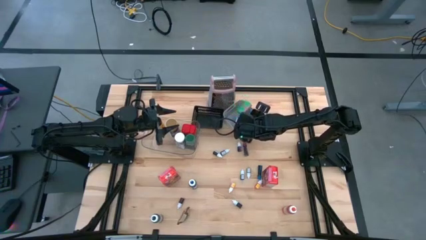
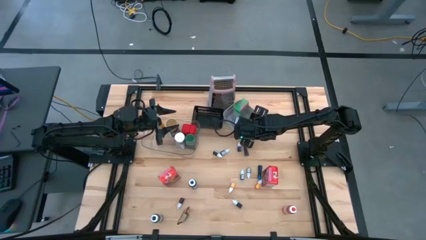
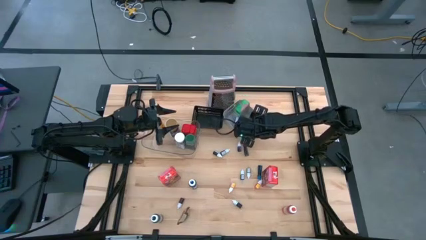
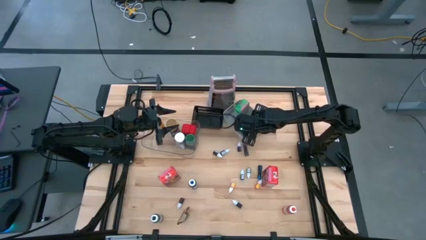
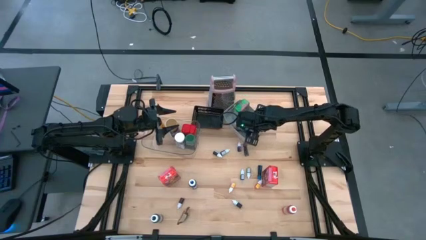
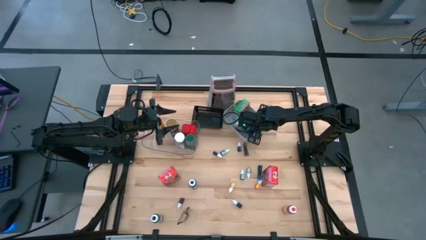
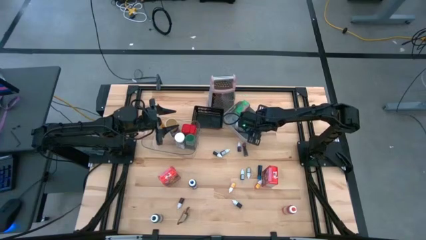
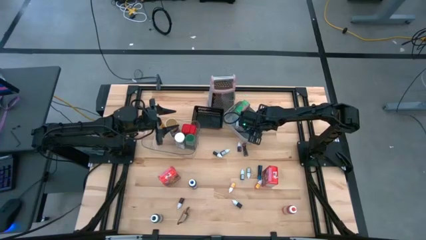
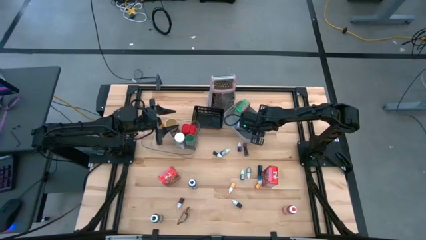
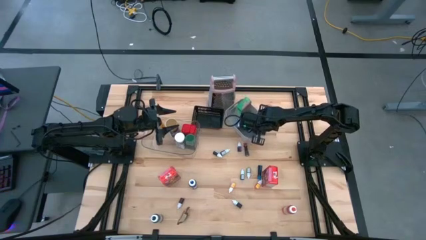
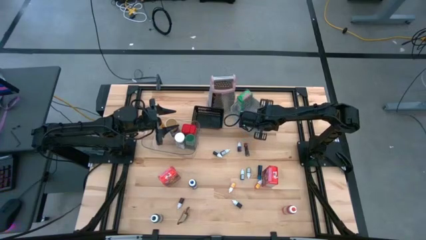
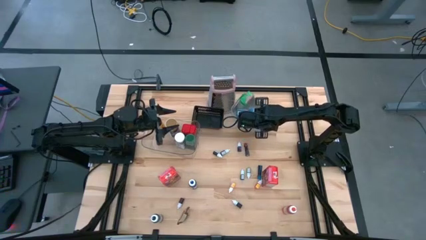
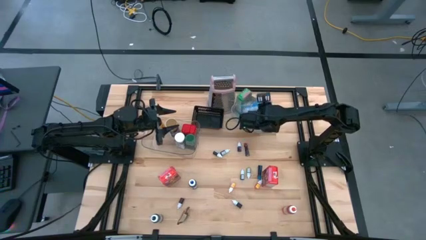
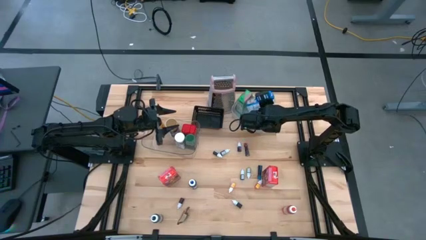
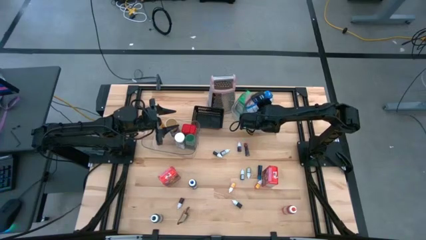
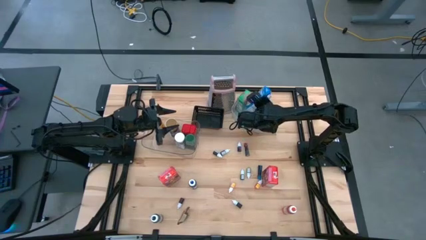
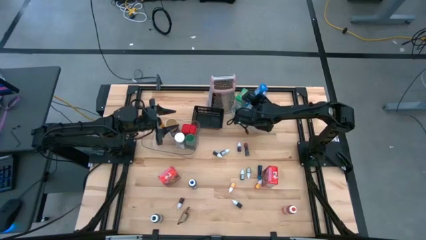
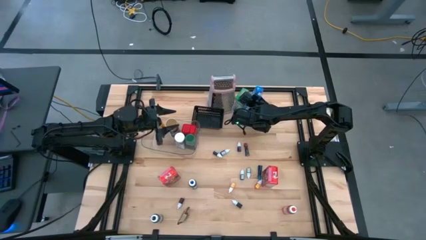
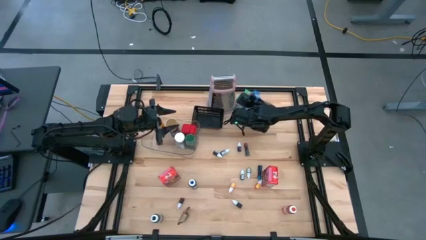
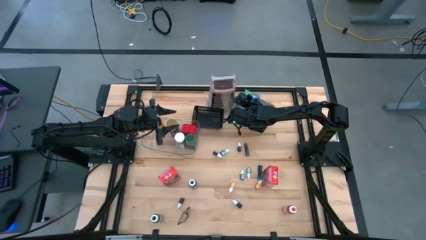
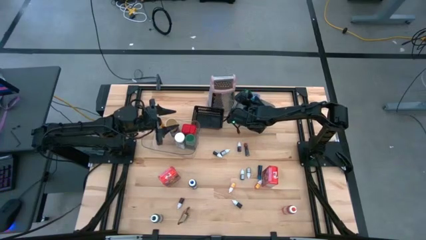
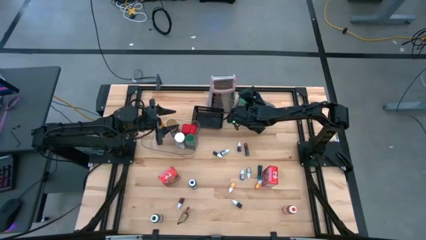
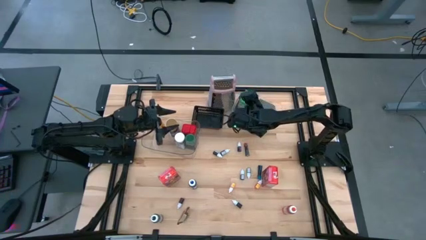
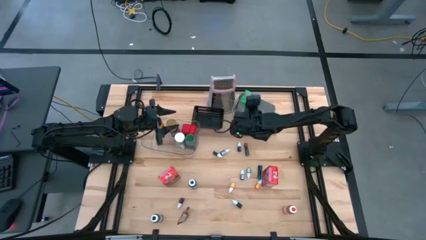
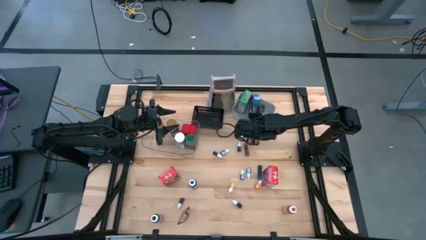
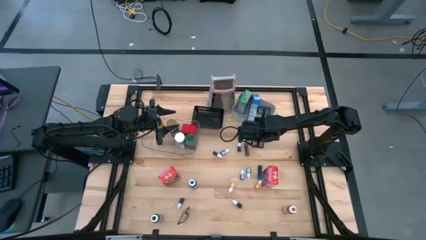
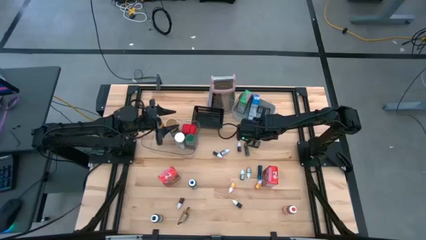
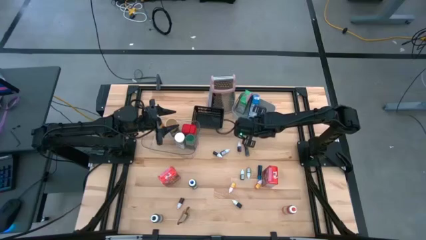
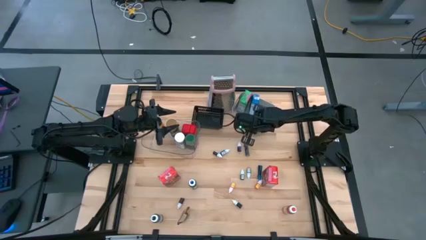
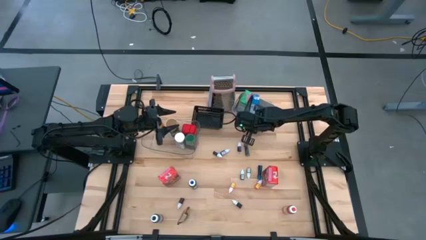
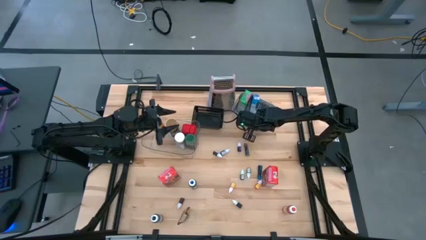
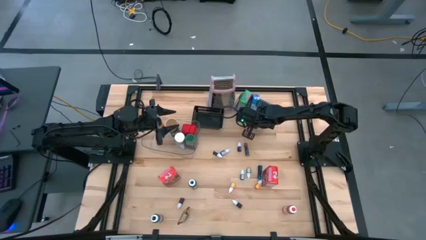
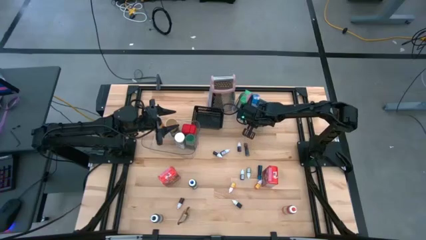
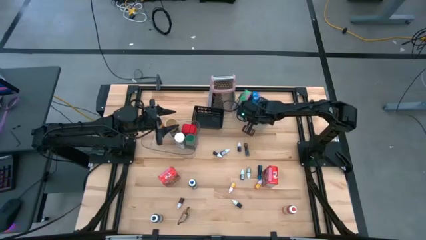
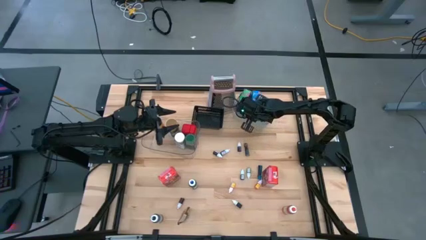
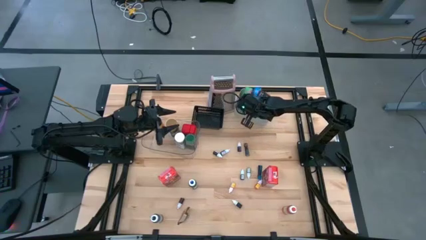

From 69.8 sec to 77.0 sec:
Task: Pick & Place Kitchen Items
Put the blue cereal box into the gray bin

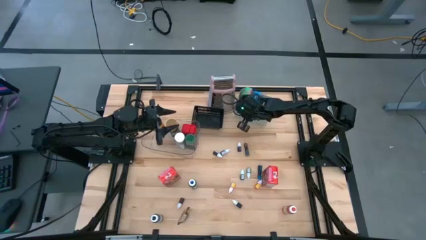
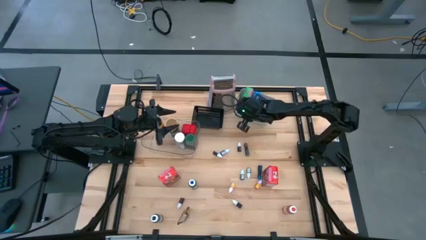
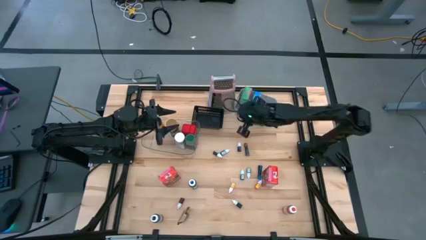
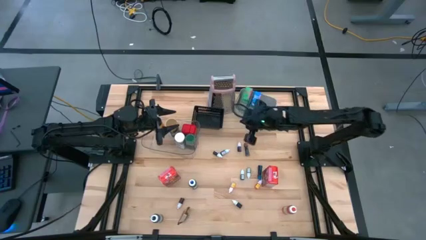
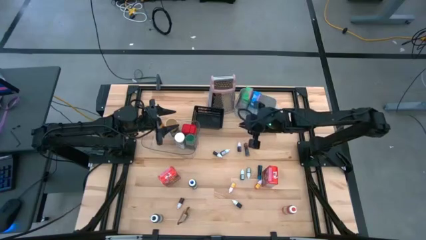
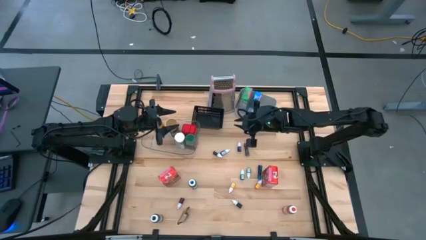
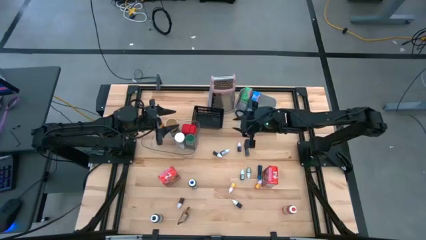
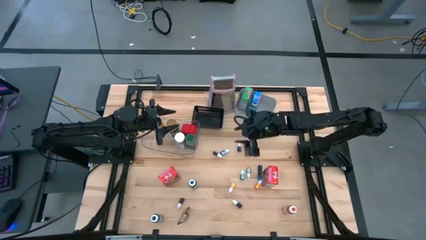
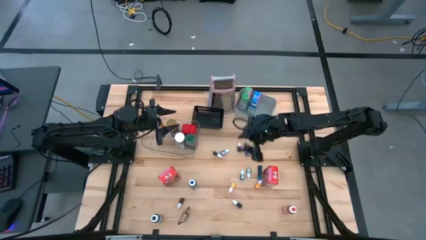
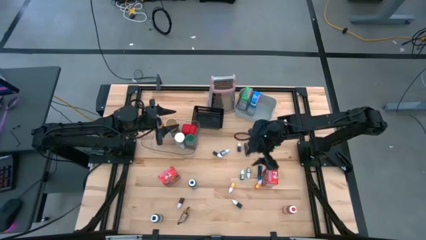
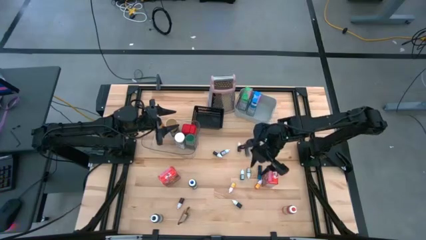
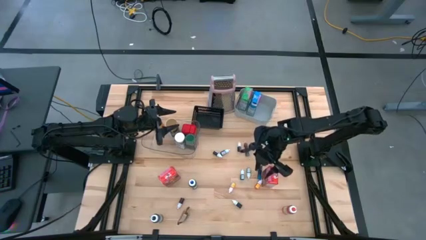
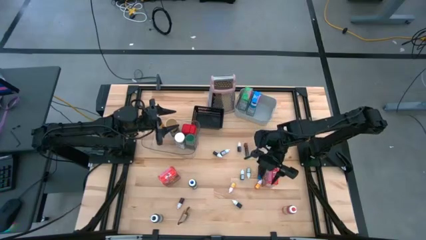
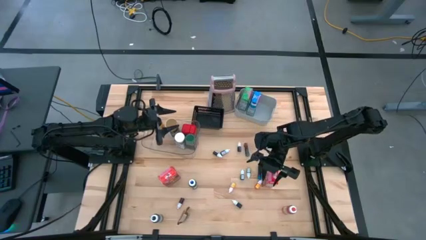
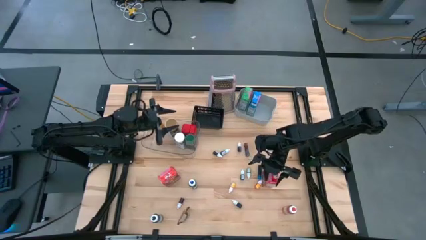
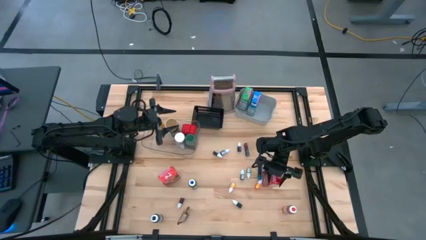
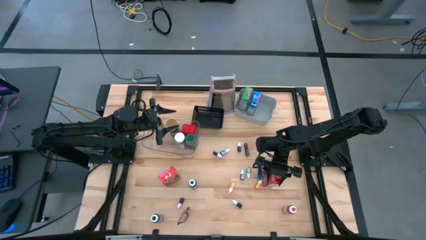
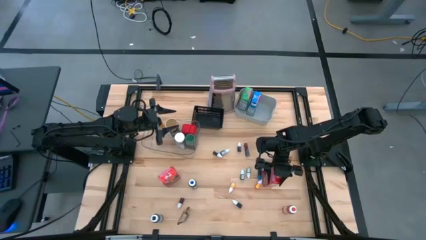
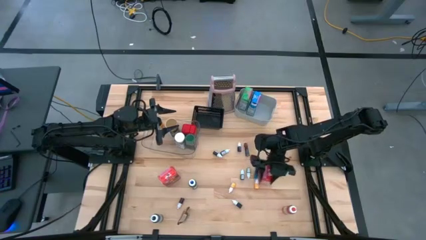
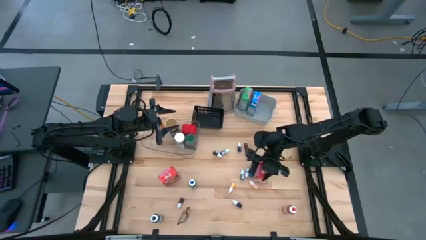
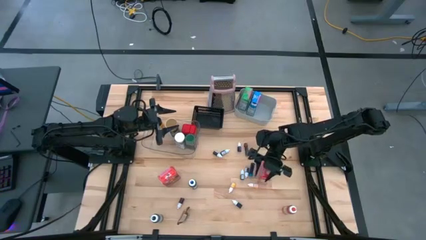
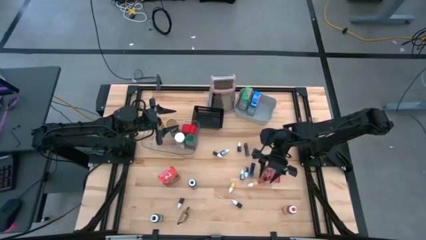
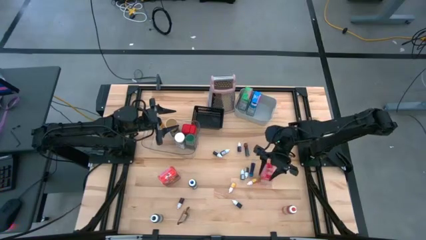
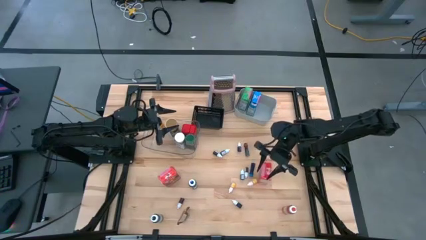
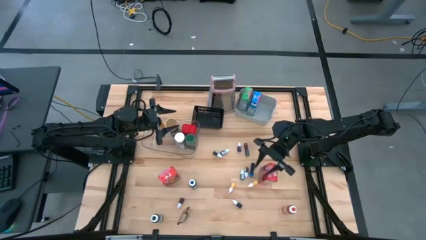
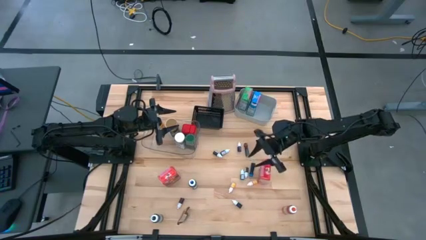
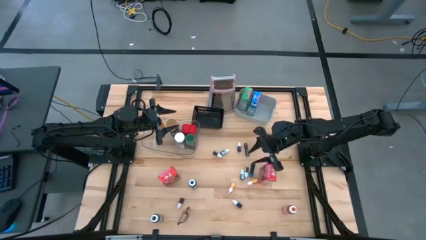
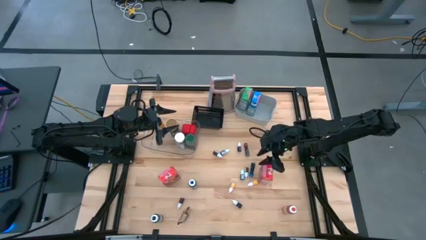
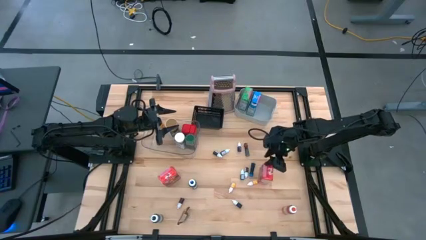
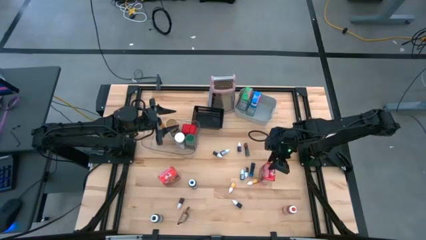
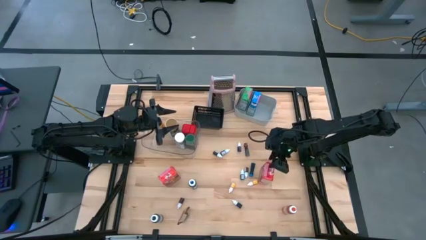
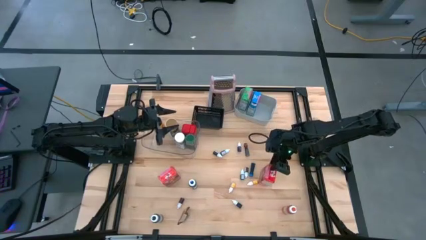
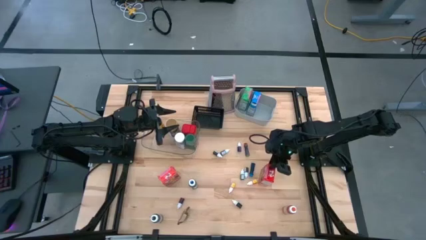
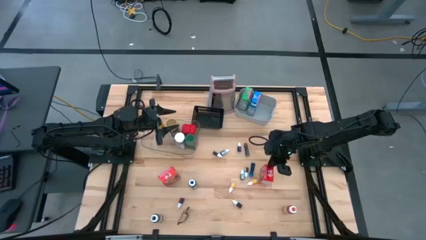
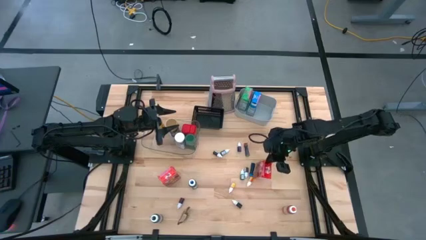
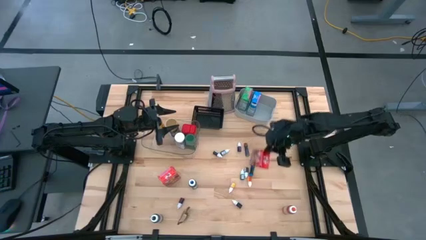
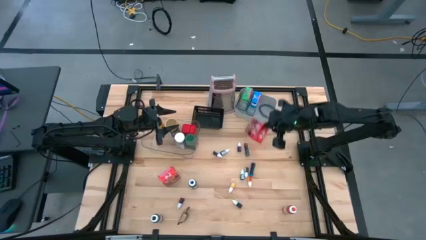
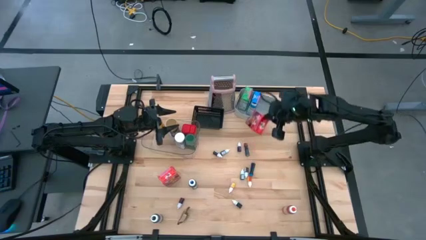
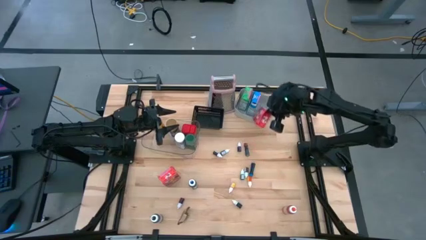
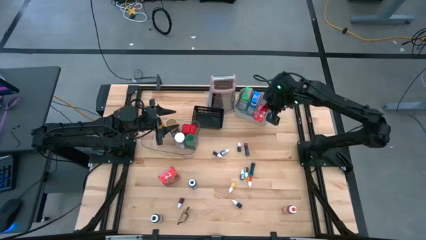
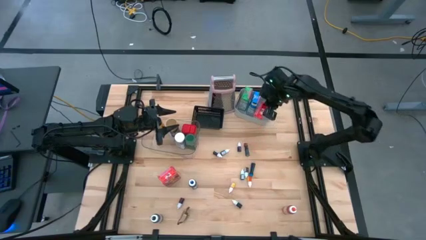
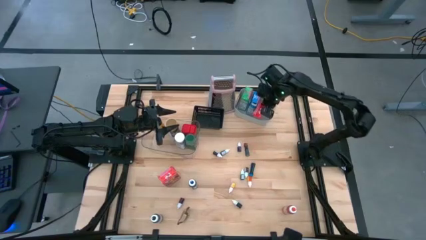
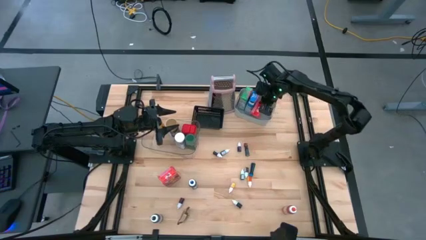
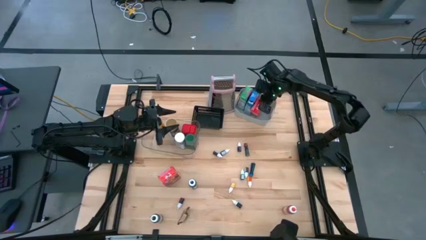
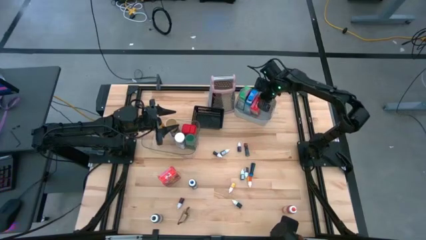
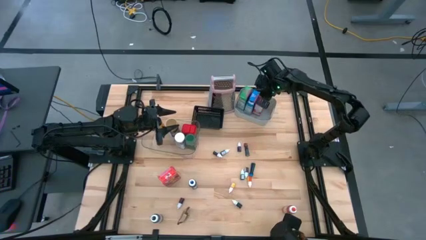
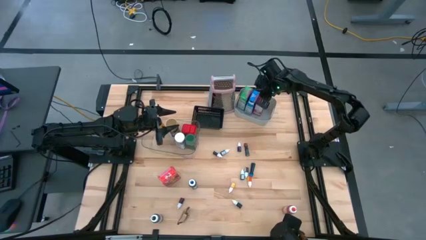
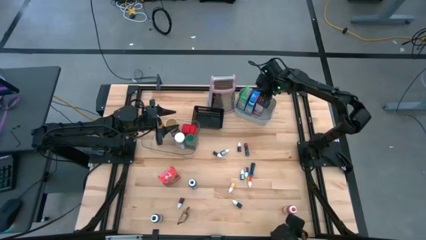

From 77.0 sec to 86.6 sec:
Put the red cereal box into the gray bin
